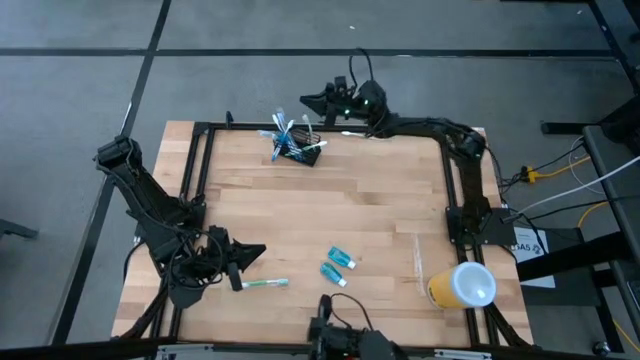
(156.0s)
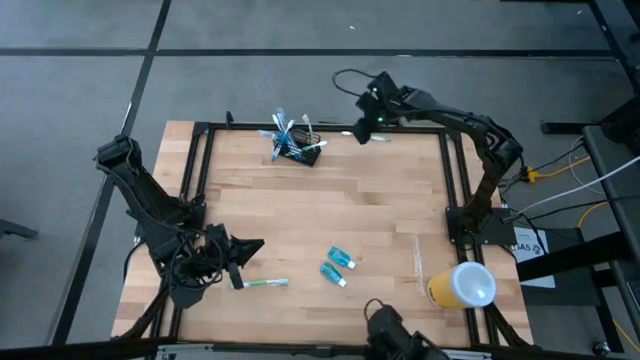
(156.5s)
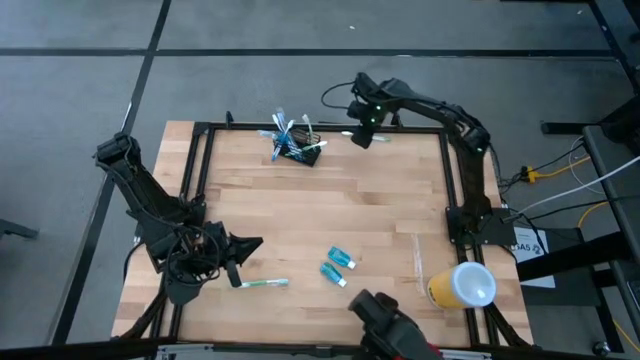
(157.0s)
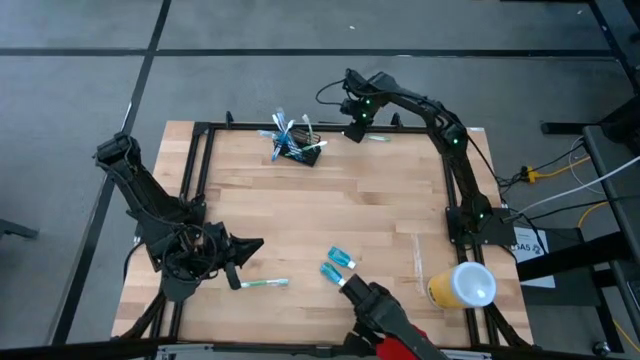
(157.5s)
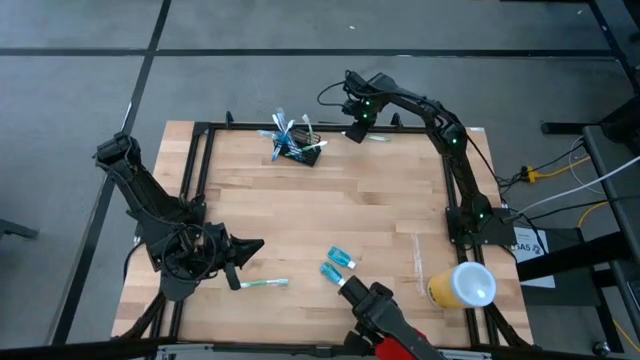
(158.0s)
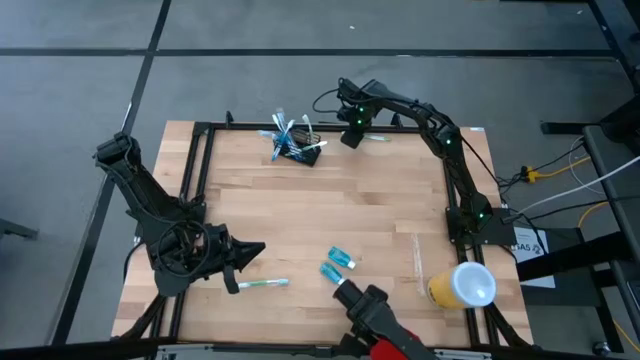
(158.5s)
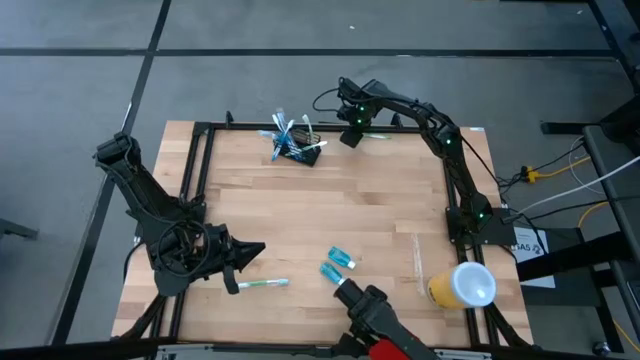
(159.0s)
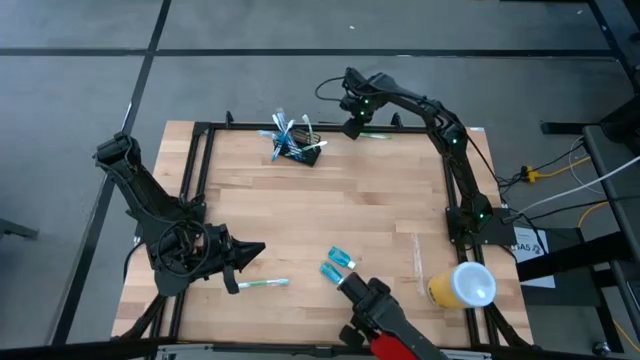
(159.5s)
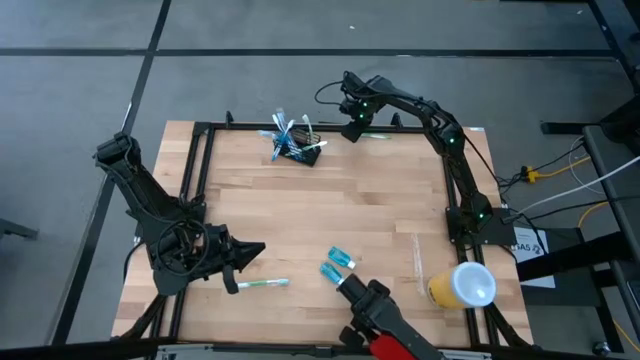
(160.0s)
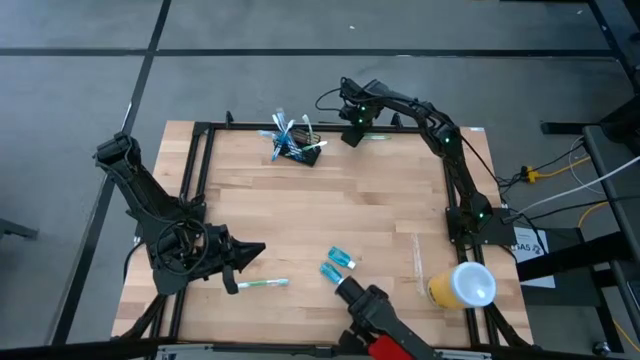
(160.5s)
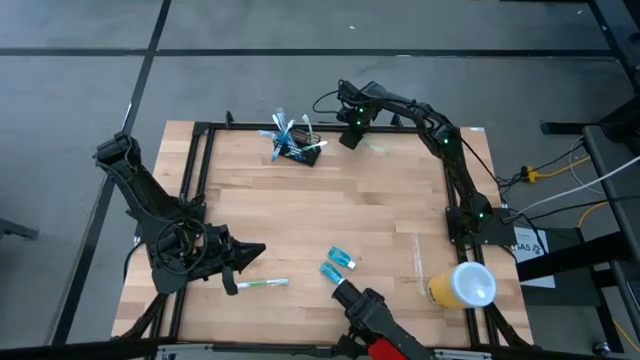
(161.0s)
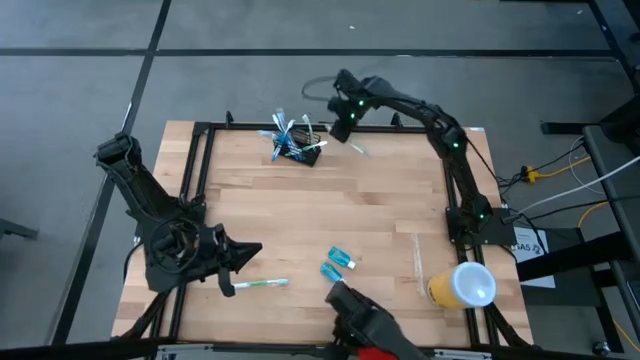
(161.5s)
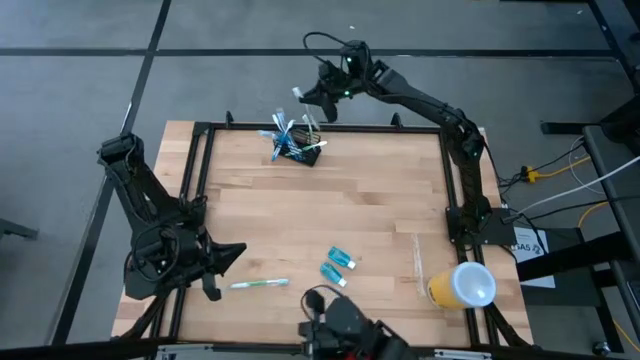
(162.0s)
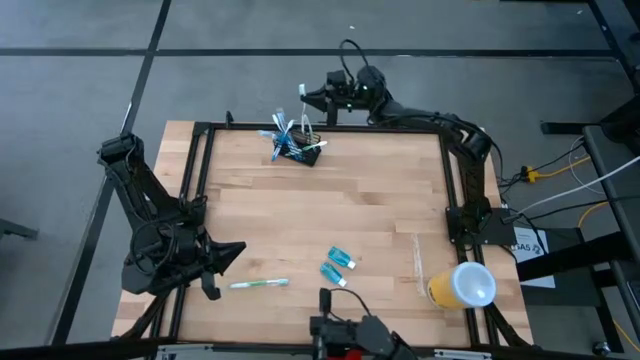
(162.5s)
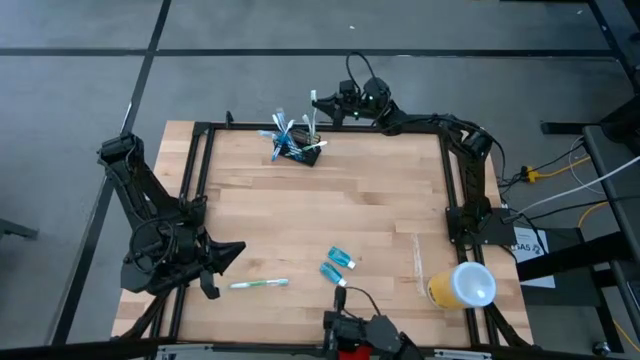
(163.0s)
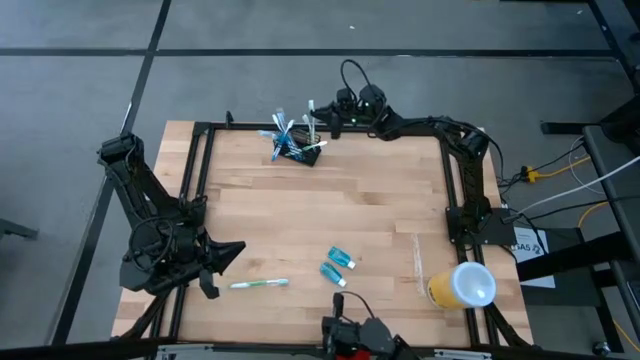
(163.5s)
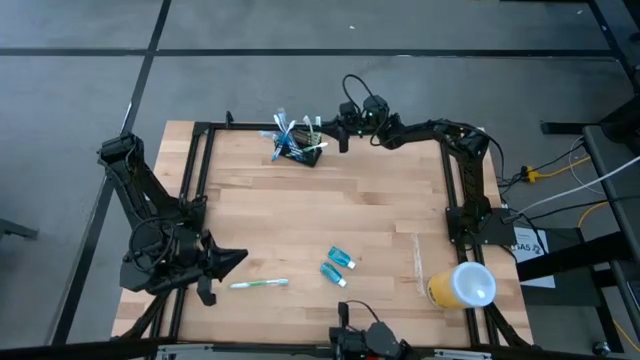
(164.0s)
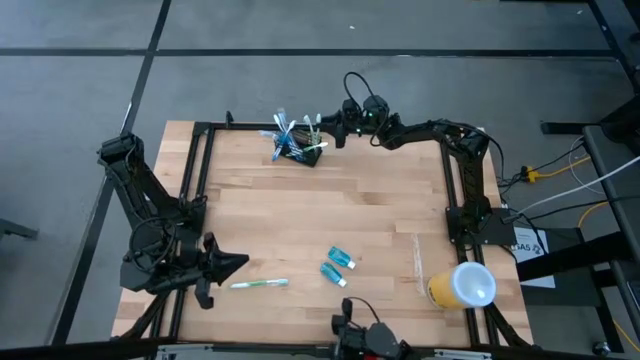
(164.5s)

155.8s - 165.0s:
Task: Pick & Place toothbrushing station
Put the green toothbrush into the wire organizer

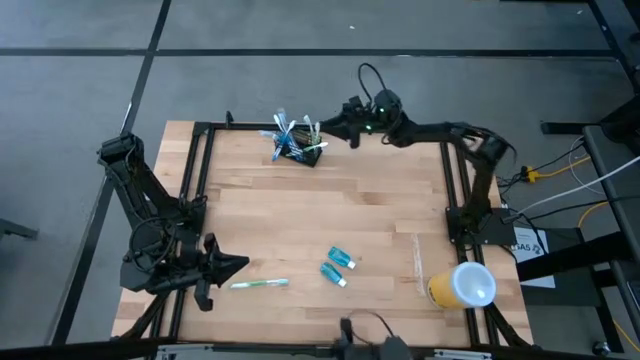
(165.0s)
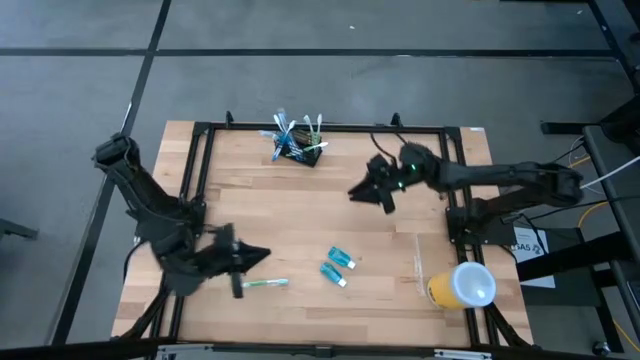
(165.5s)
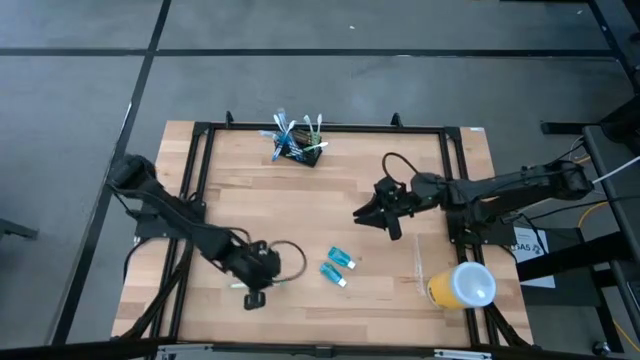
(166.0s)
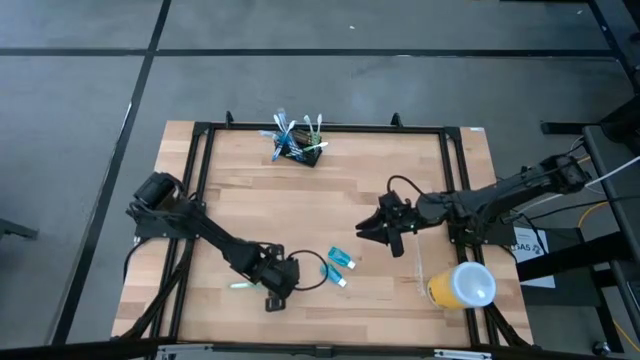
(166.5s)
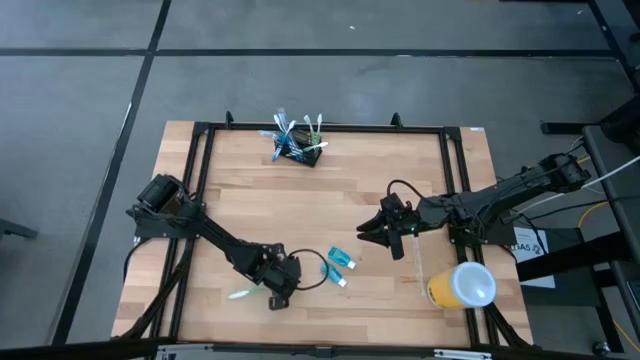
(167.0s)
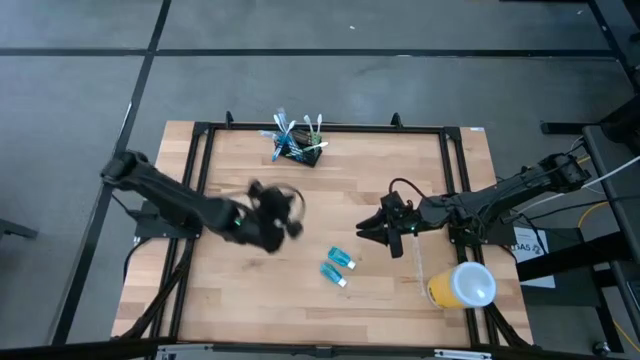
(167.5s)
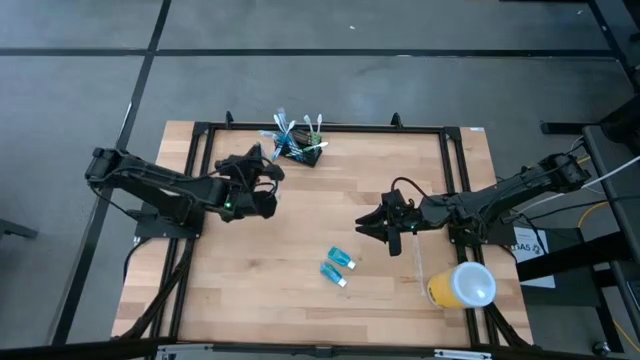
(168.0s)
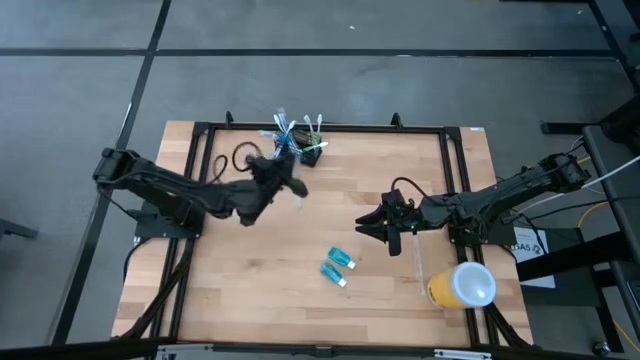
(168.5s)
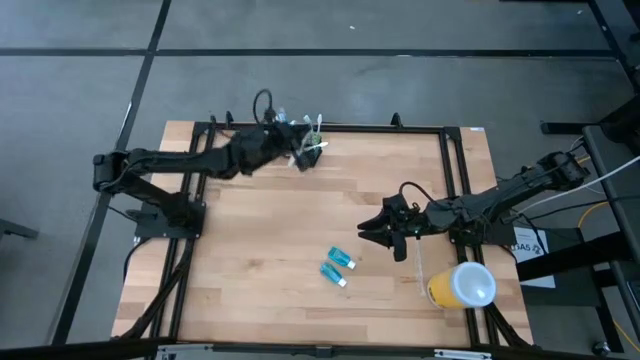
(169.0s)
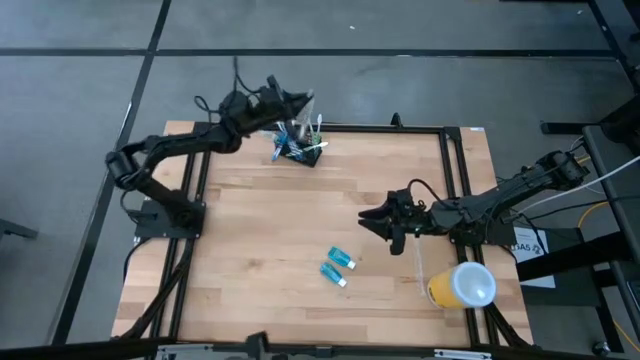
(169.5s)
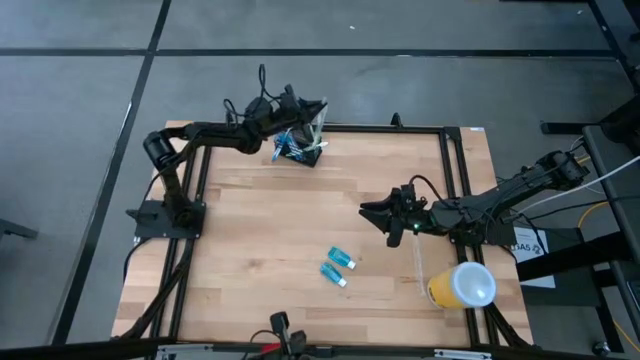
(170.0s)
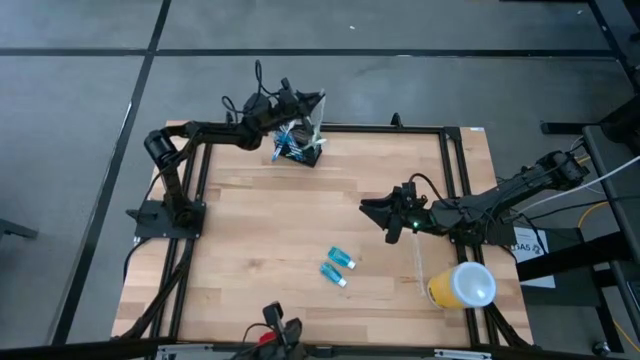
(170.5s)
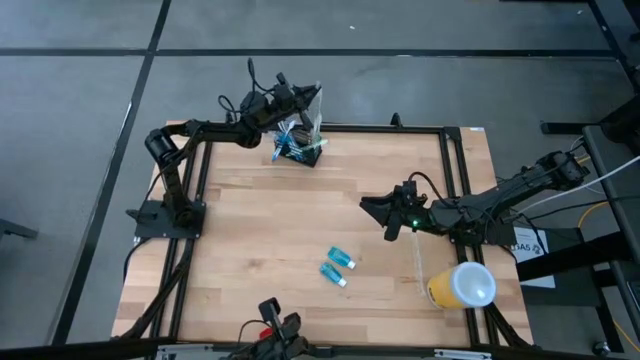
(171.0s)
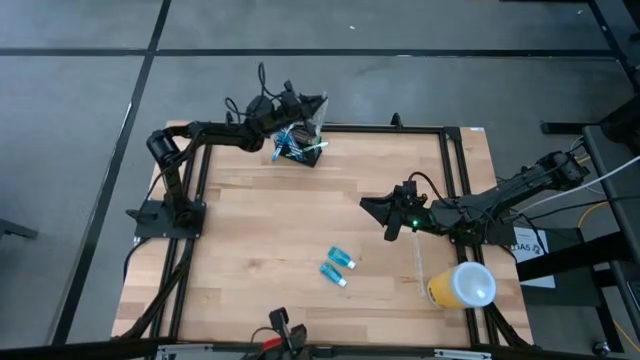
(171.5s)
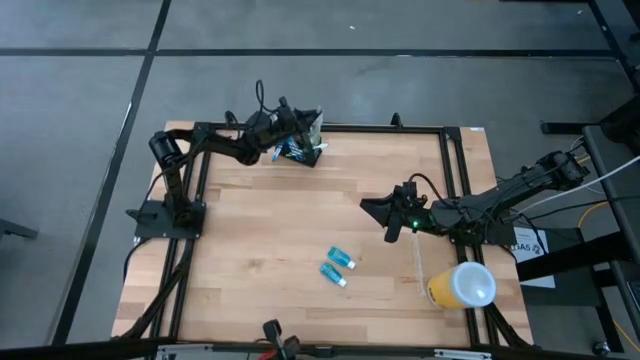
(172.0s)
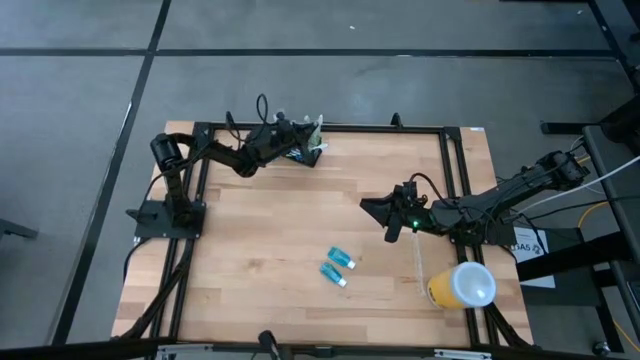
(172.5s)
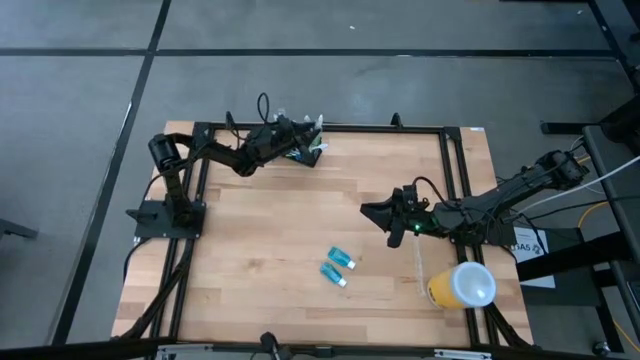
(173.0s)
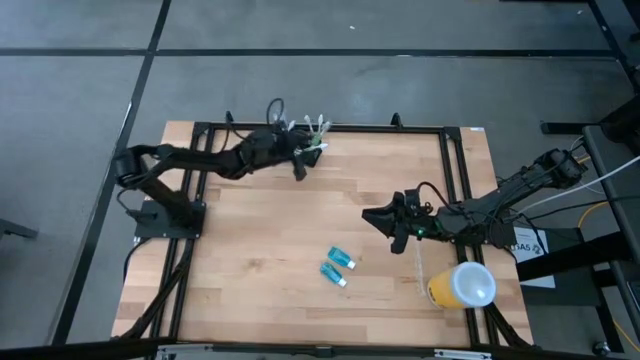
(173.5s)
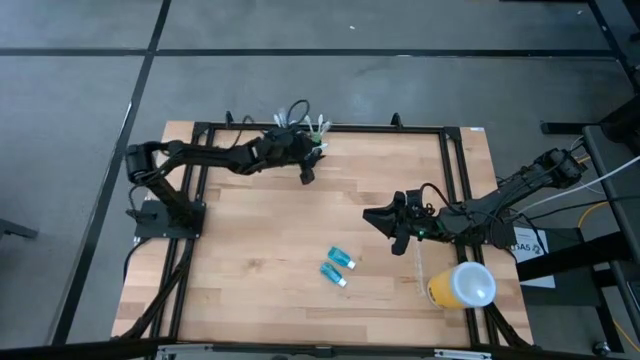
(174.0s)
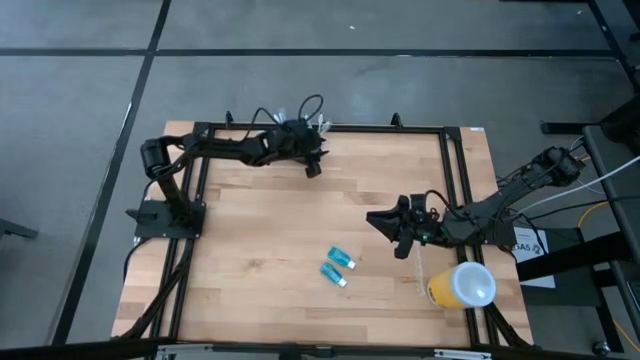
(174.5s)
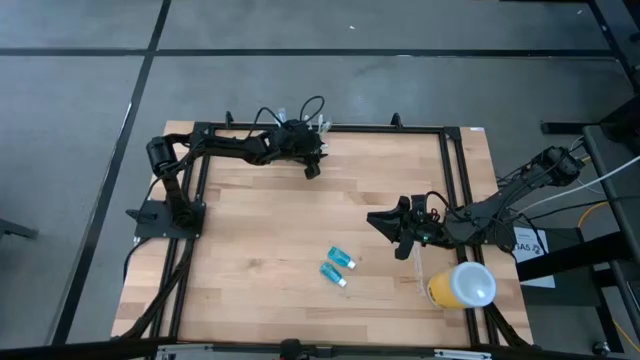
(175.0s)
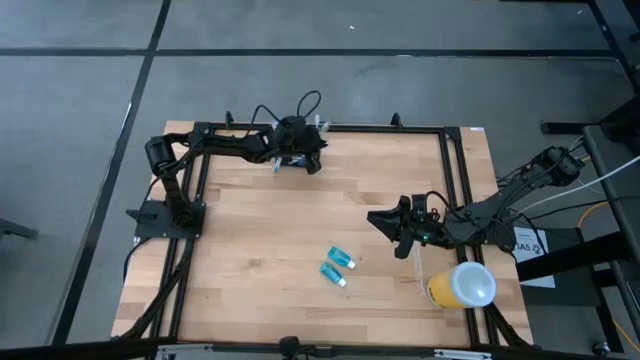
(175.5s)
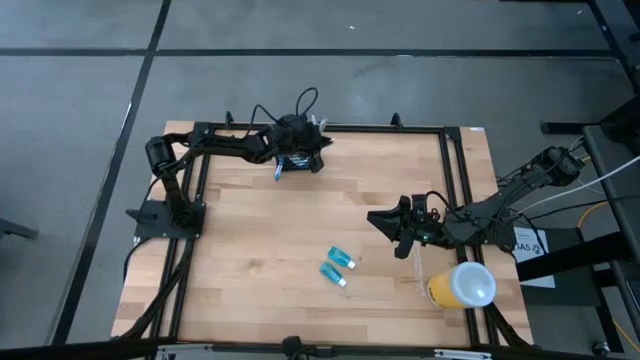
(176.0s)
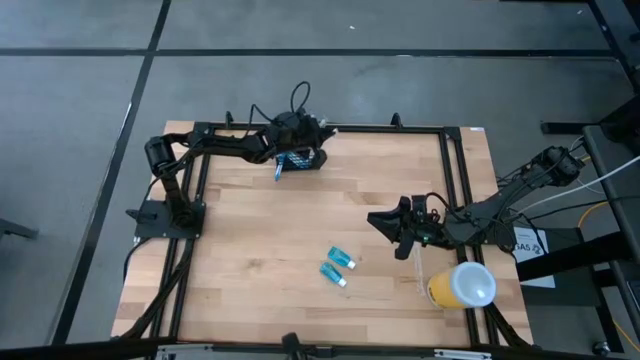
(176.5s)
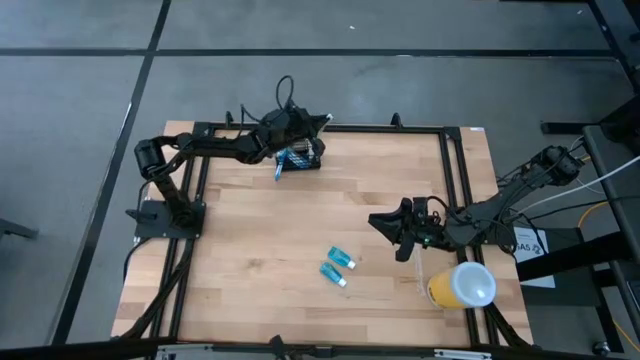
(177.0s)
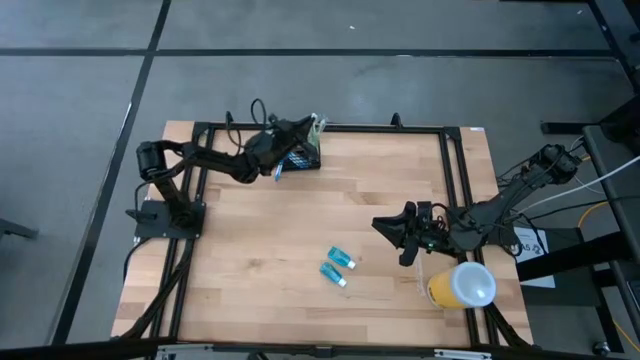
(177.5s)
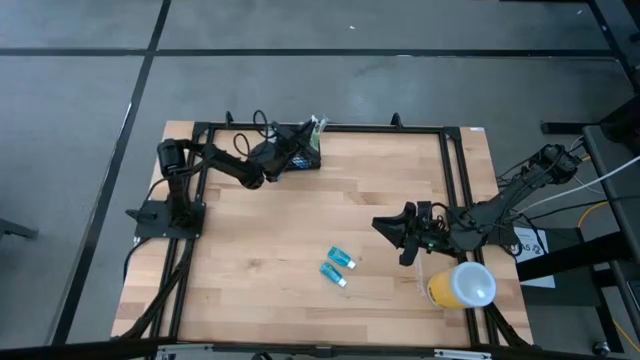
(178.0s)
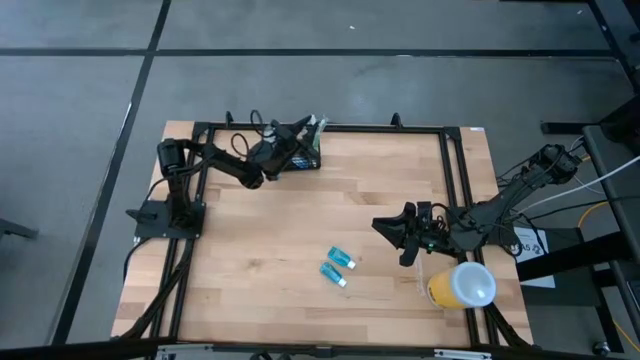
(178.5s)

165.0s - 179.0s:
Put the green toothbrush into the wire organizer
